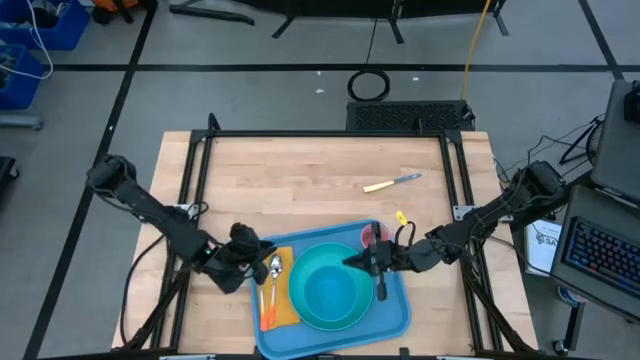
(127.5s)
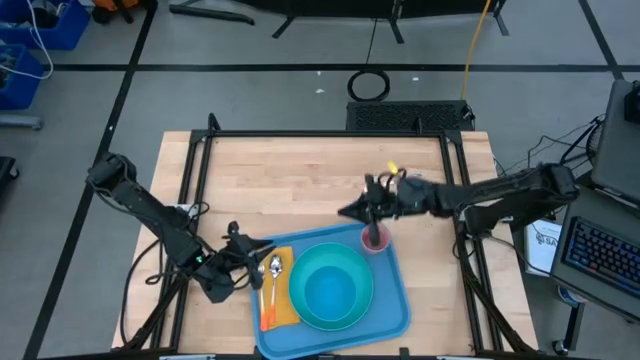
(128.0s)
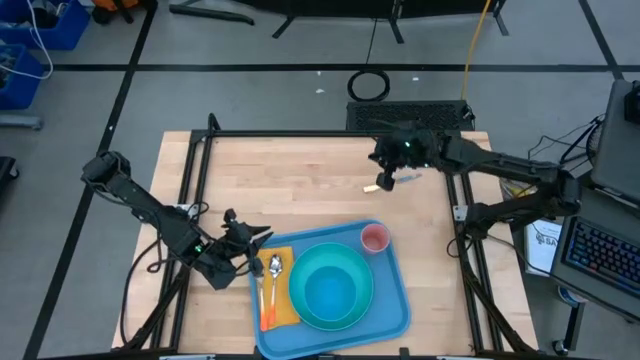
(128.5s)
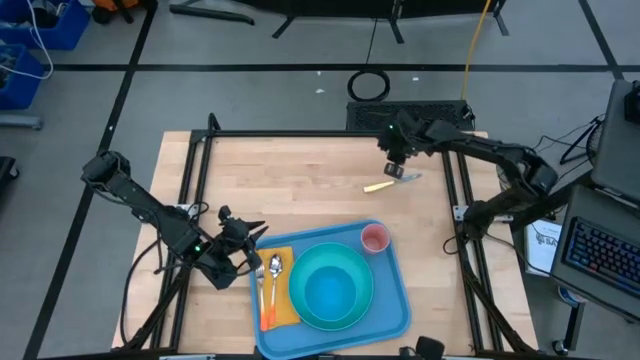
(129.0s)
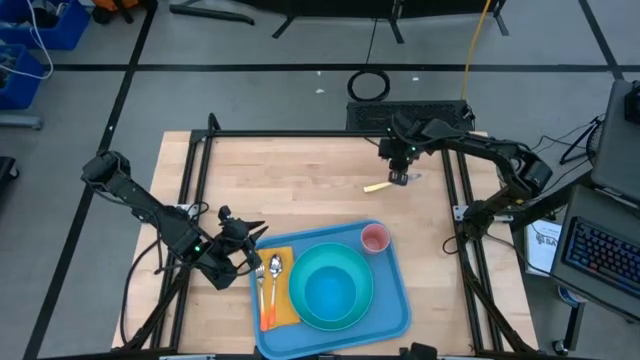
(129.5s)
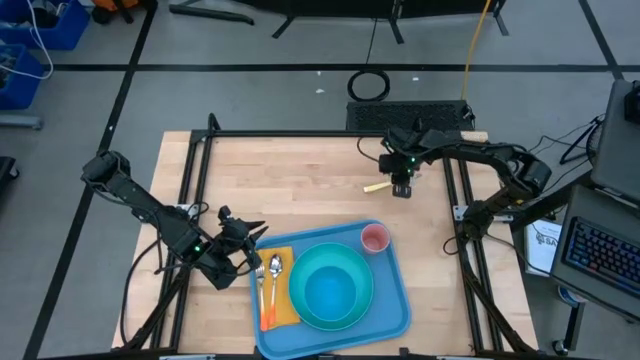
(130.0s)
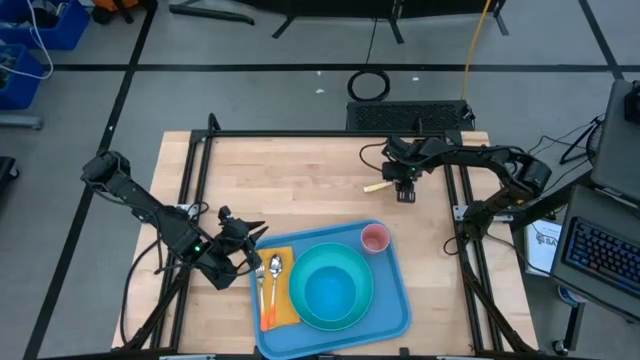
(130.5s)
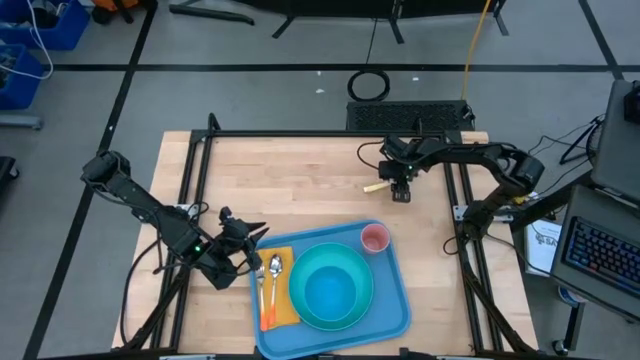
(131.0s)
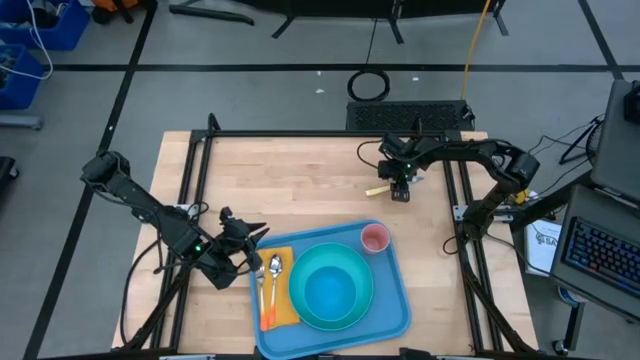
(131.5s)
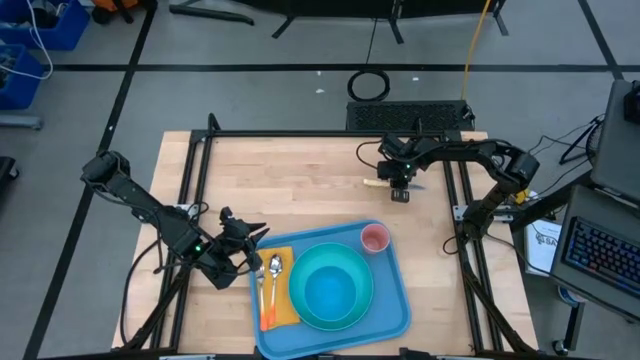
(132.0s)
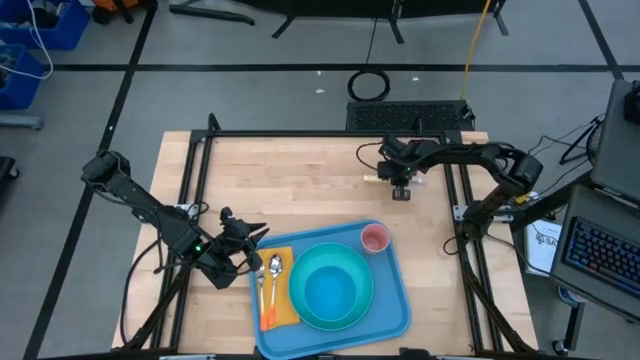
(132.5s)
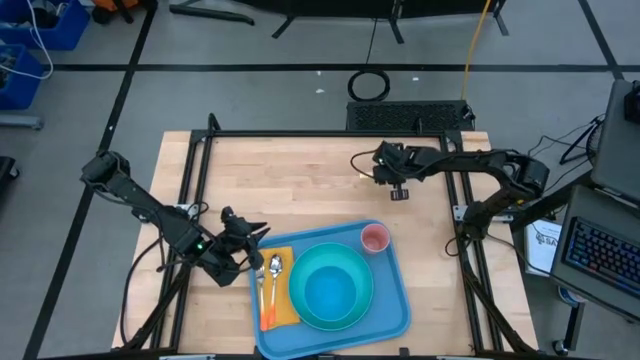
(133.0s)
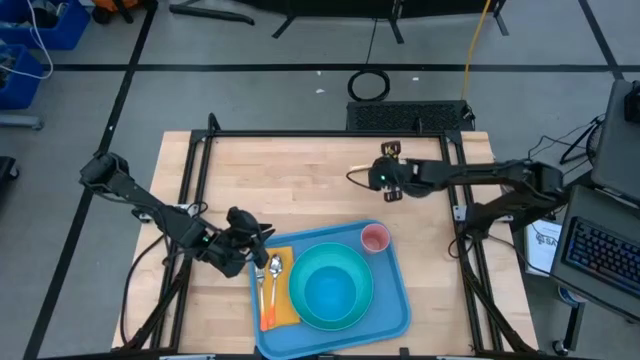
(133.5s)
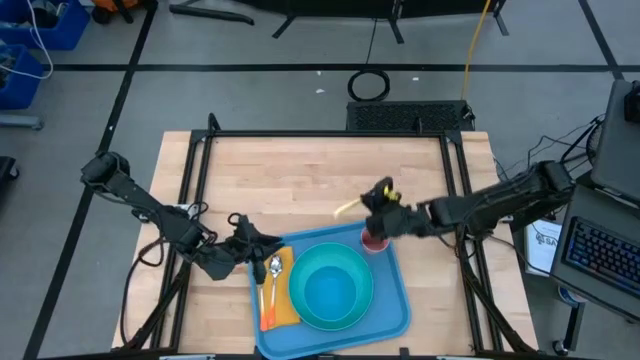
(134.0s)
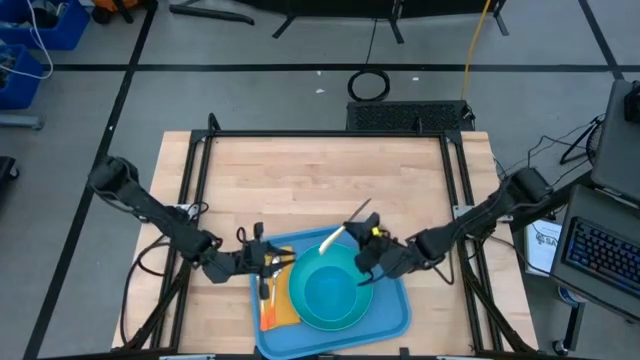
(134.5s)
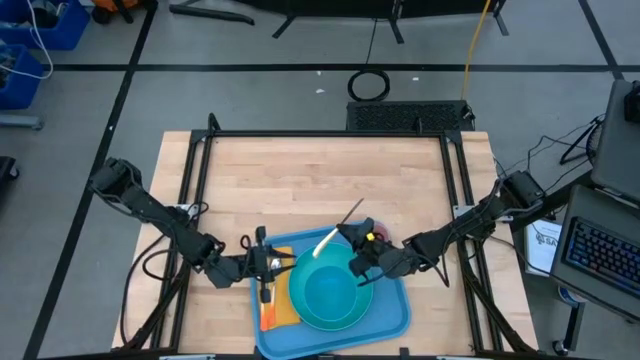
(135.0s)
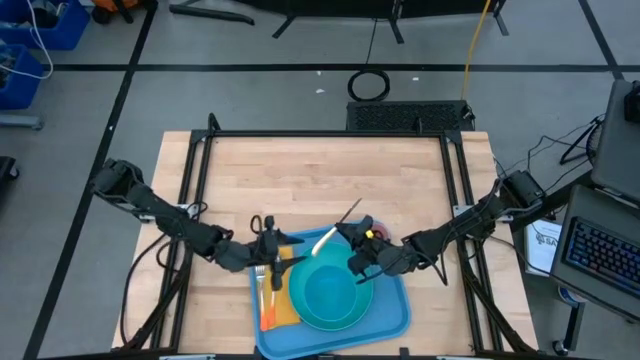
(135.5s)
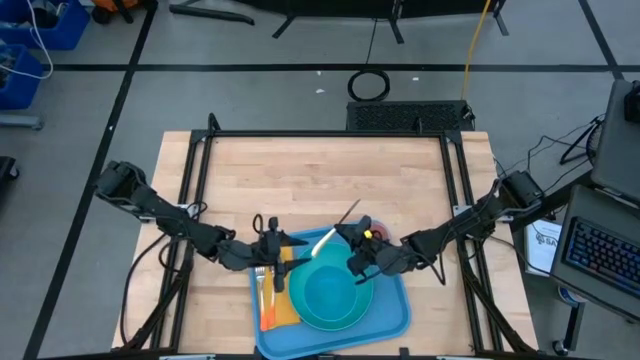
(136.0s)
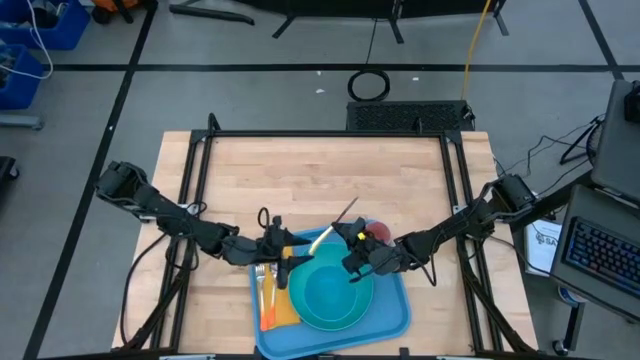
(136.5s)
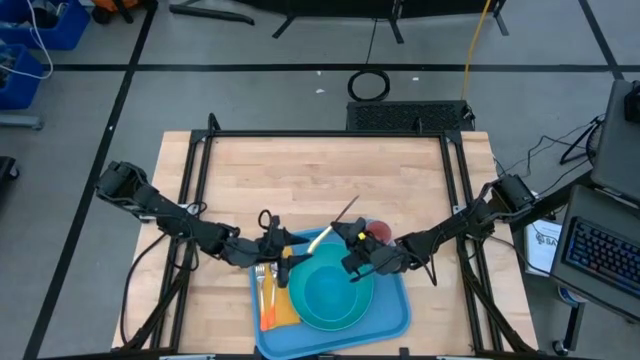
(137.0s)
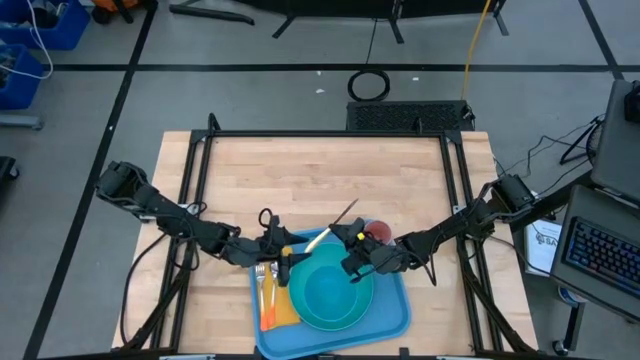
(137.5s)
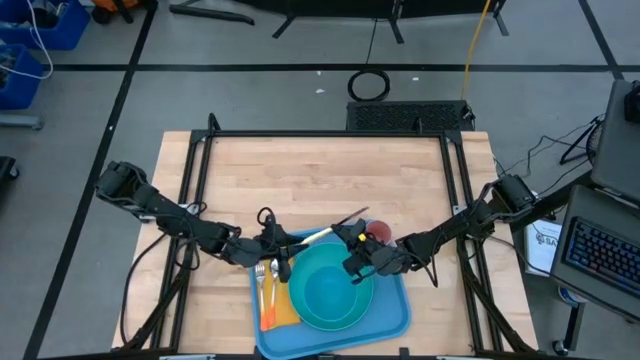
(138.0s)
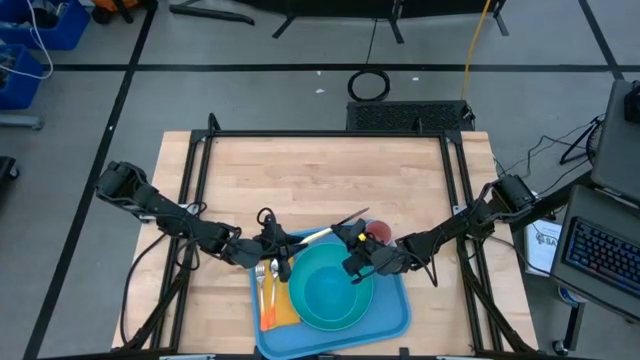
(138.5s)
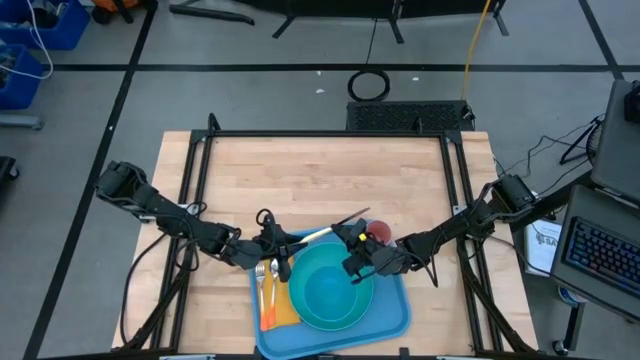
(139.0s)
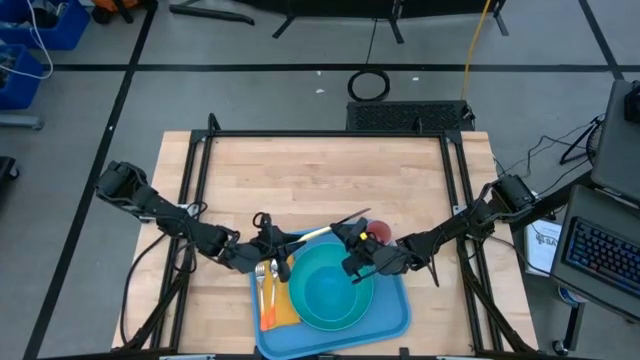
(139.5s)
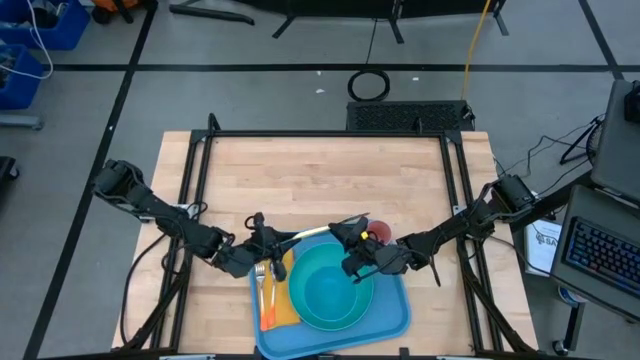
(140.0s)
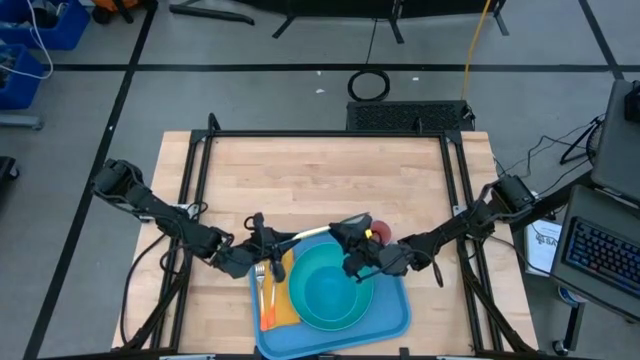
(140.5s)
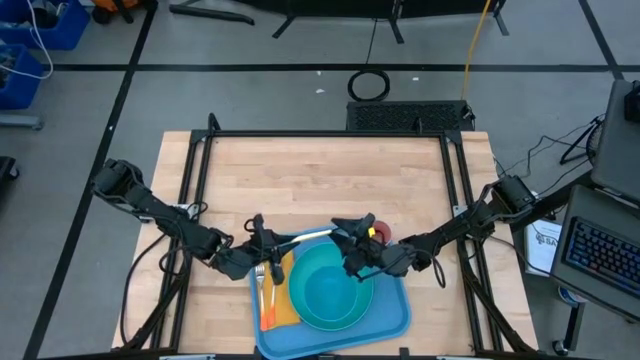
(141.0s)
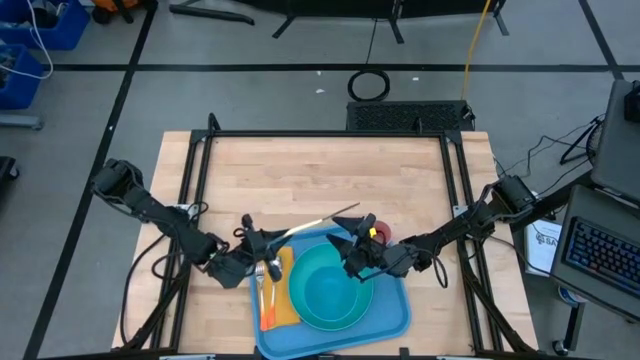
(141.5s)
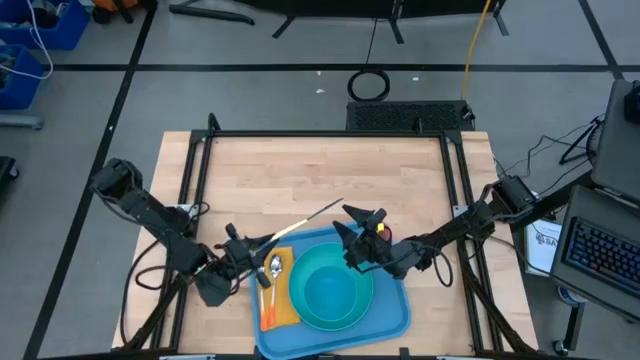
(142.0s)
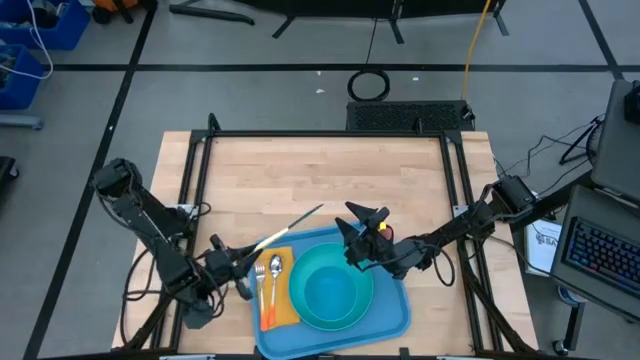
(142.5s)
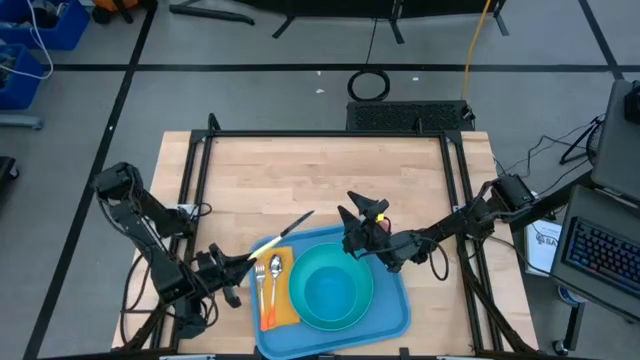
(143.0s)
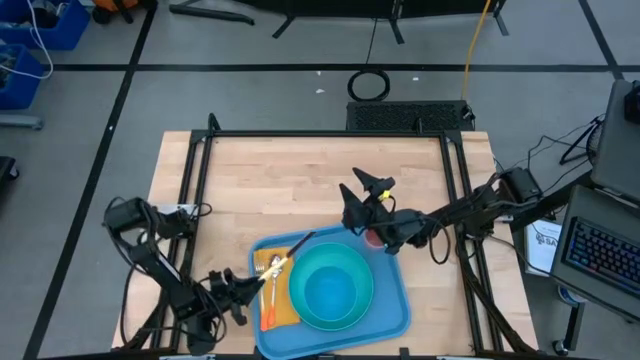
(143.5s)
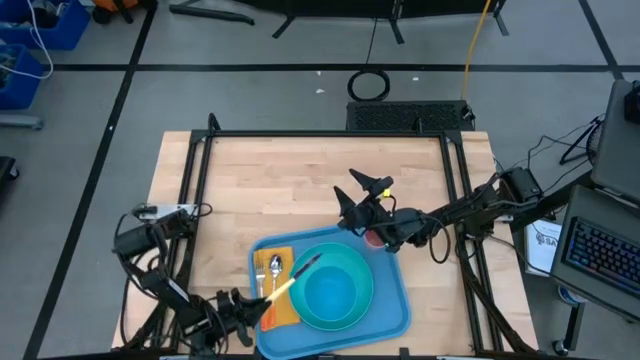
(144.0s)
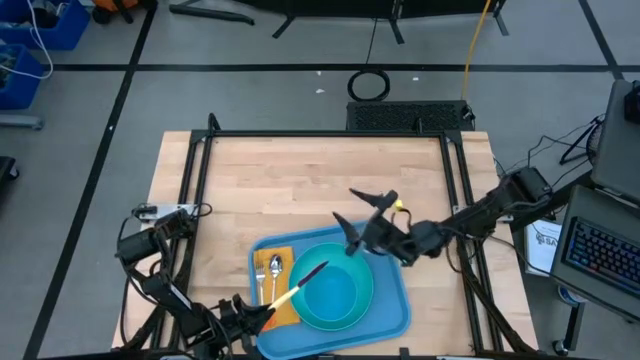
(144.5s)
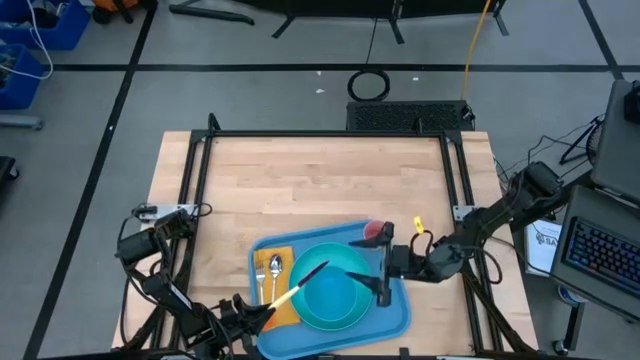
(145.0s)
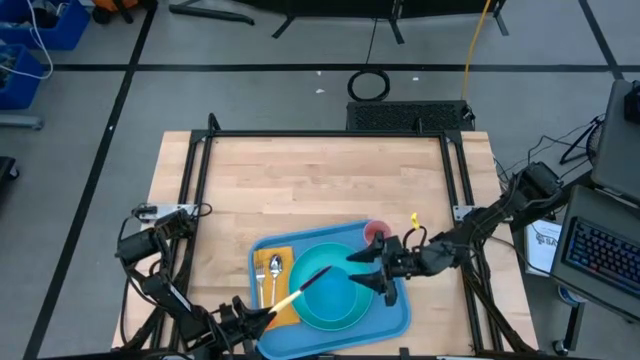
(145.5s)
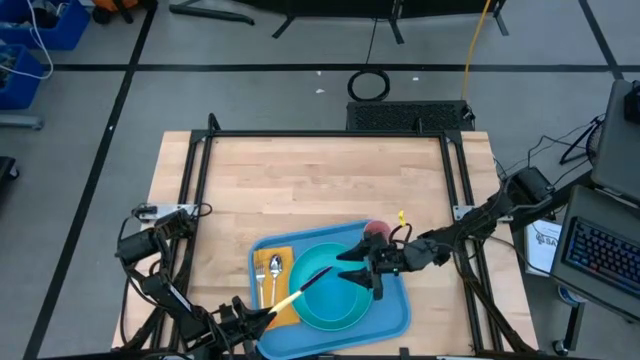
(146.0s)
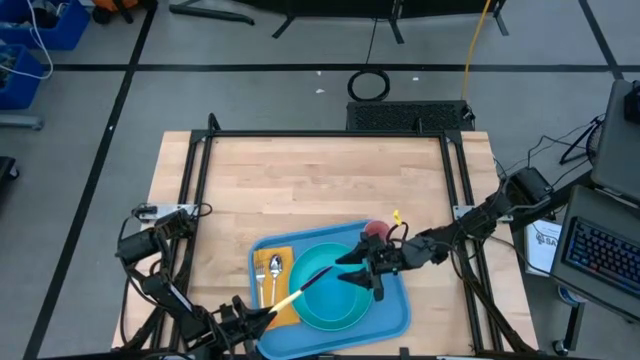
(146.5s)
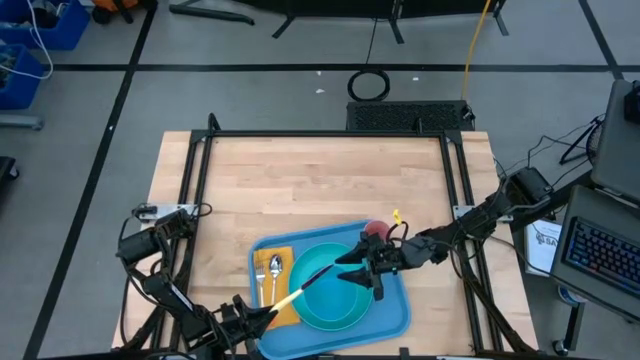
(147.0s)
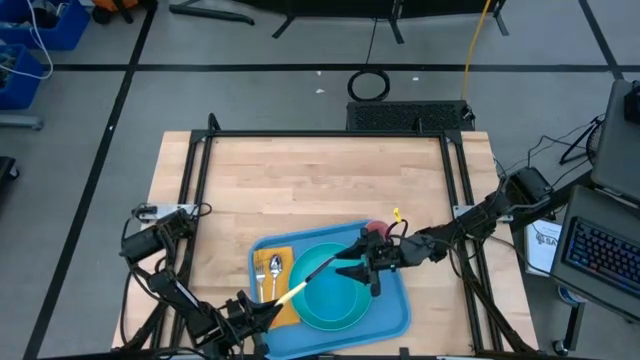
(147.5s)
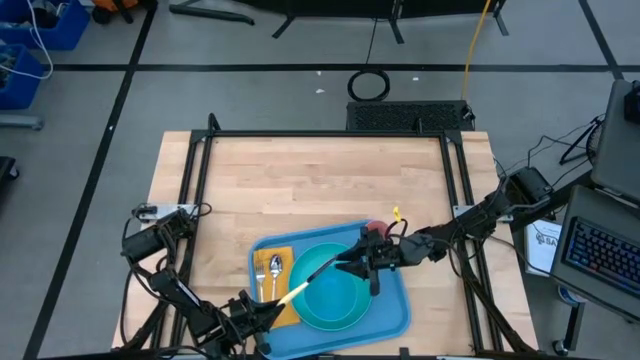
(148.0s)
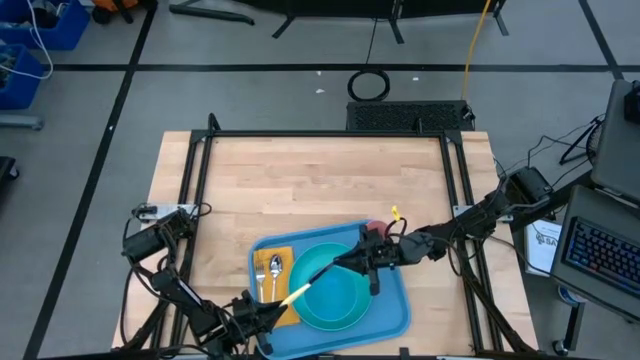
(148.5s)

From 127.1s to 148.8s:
Task: Set up tray
Put the knife on top of the napkin to the right of the spoon

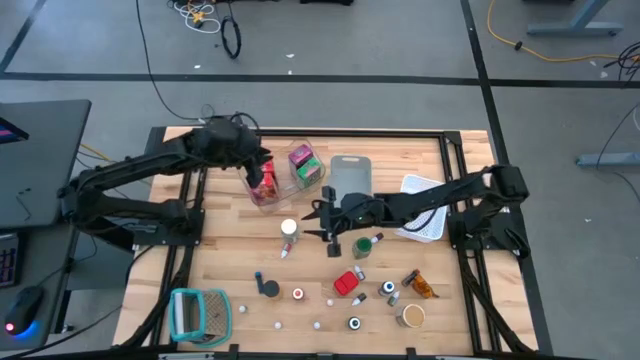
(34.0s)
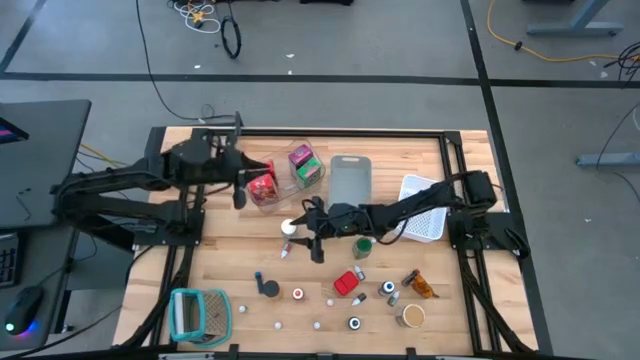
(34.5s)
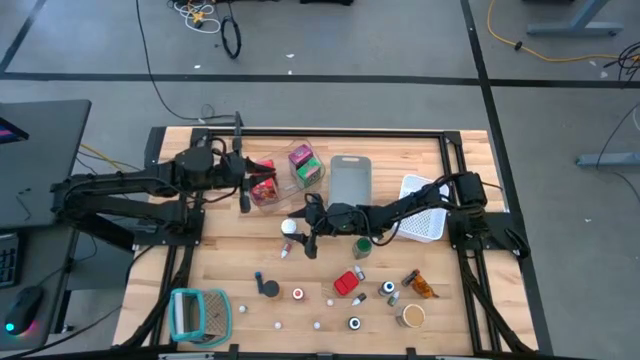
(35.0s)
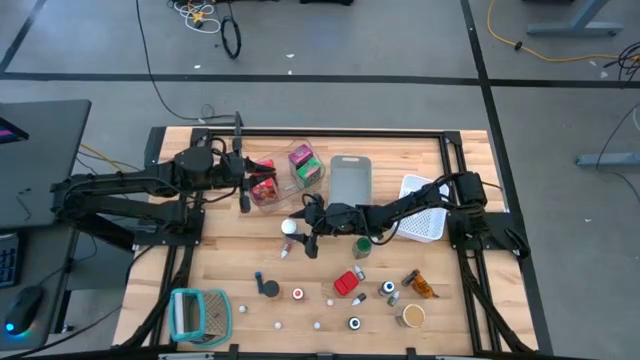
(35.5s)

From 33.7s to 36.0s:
Task: Pick & Place Kitchen Items
Put the white spice bottle into the gray bin
